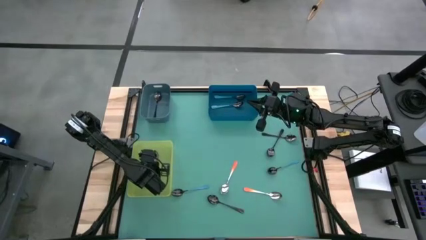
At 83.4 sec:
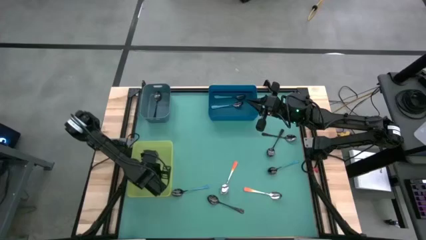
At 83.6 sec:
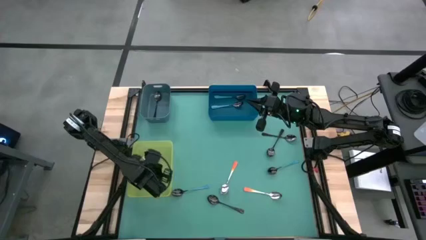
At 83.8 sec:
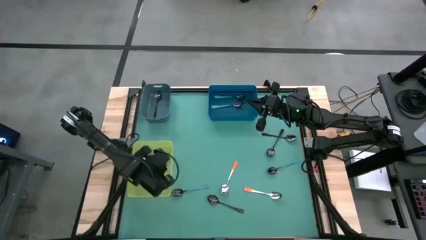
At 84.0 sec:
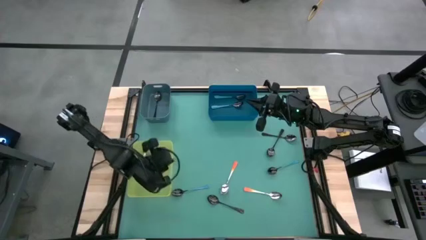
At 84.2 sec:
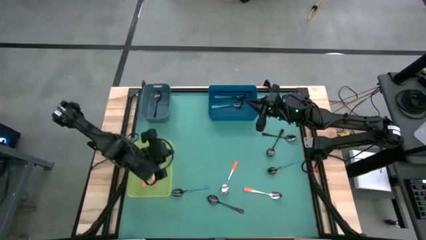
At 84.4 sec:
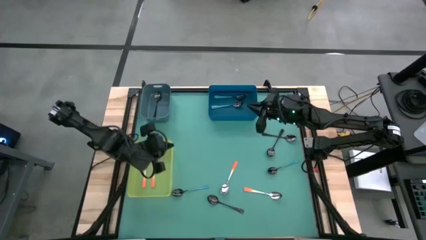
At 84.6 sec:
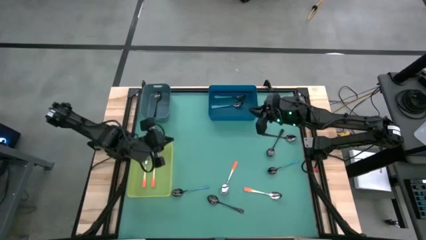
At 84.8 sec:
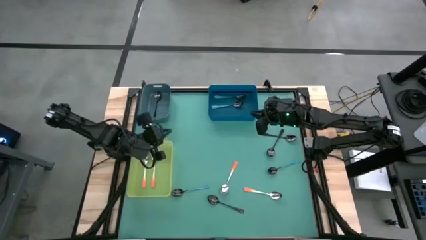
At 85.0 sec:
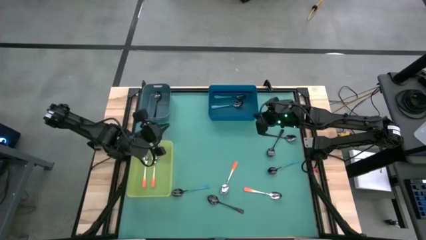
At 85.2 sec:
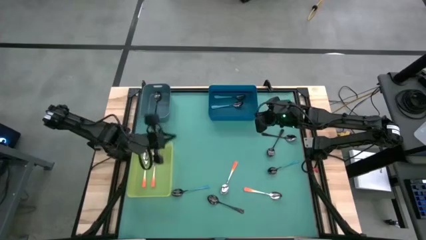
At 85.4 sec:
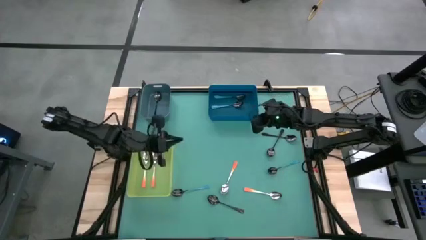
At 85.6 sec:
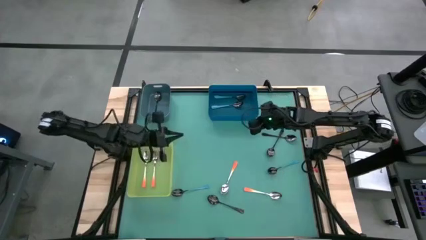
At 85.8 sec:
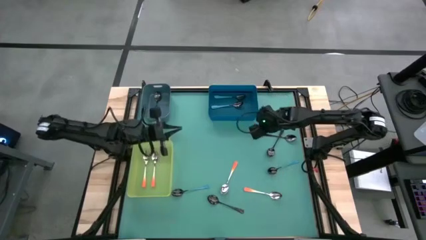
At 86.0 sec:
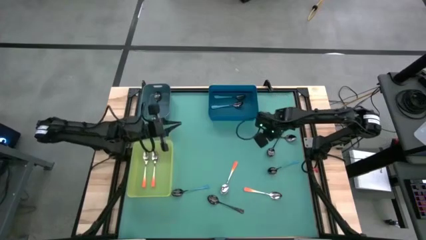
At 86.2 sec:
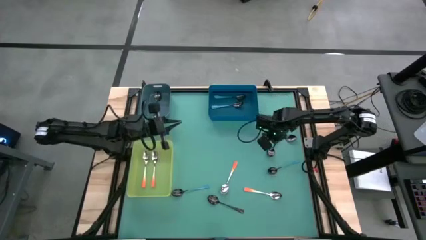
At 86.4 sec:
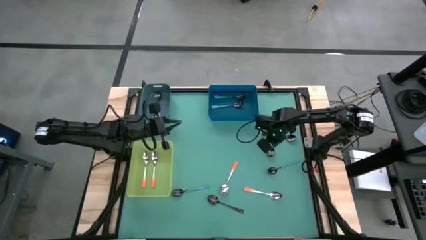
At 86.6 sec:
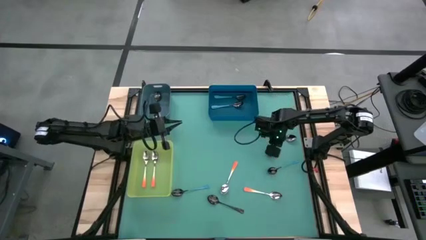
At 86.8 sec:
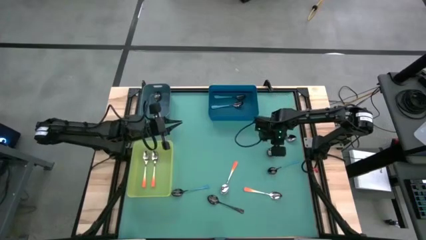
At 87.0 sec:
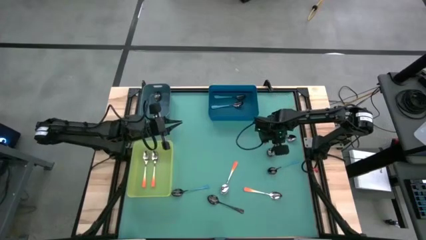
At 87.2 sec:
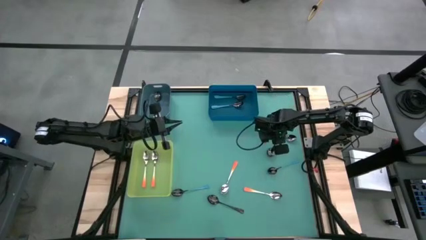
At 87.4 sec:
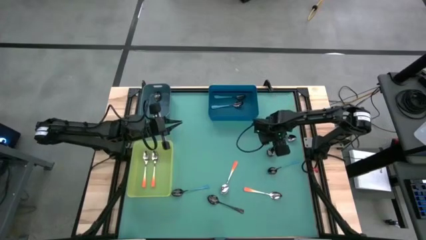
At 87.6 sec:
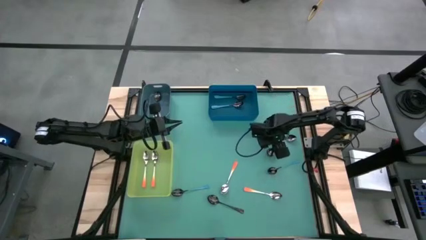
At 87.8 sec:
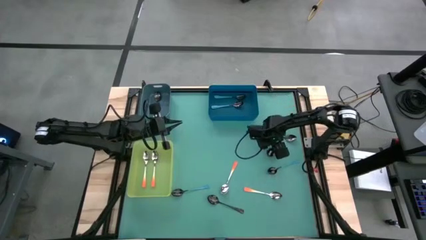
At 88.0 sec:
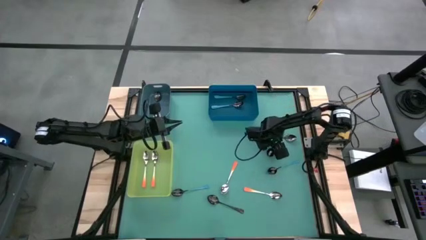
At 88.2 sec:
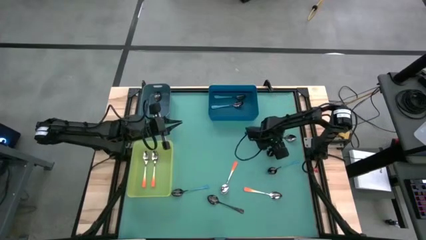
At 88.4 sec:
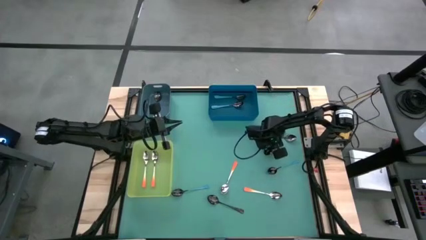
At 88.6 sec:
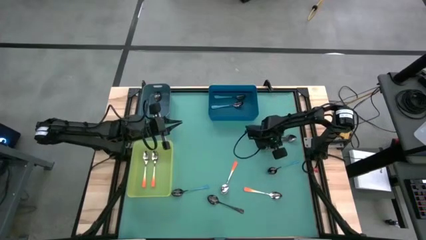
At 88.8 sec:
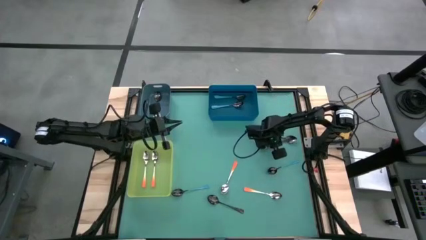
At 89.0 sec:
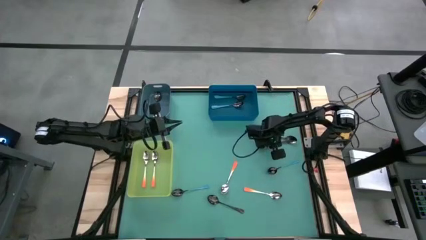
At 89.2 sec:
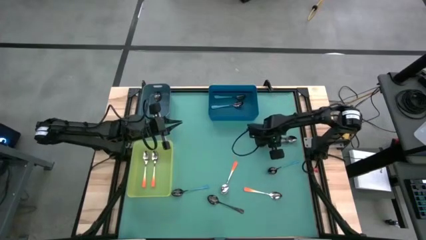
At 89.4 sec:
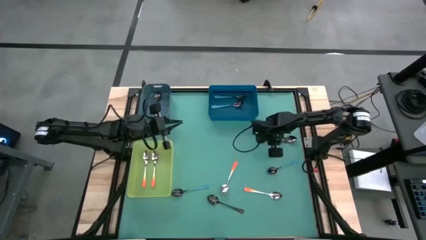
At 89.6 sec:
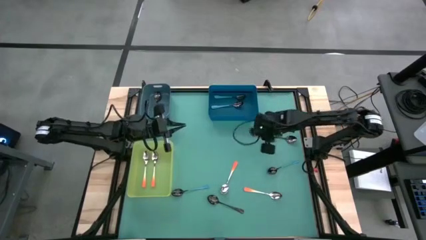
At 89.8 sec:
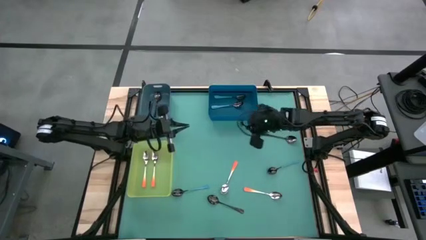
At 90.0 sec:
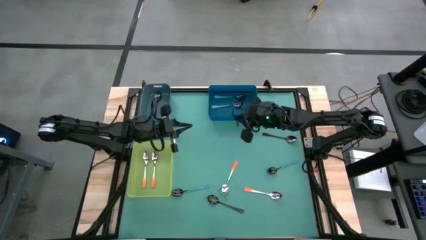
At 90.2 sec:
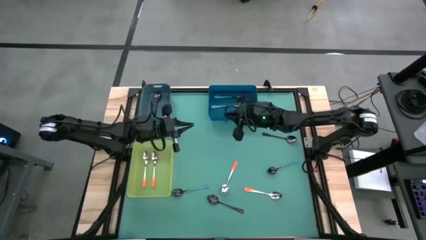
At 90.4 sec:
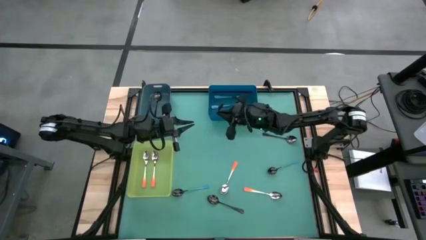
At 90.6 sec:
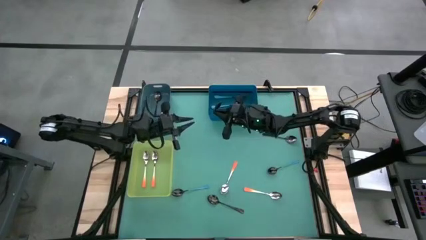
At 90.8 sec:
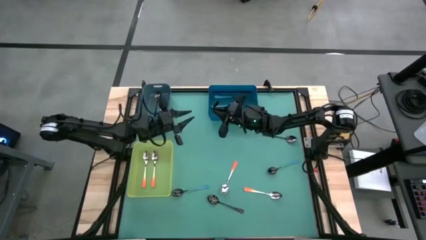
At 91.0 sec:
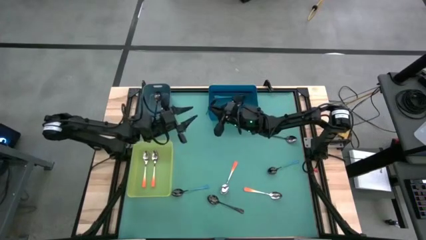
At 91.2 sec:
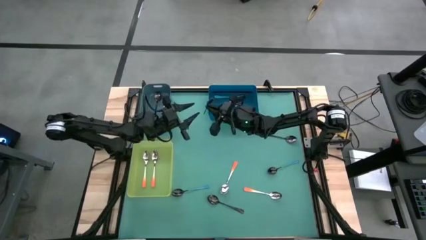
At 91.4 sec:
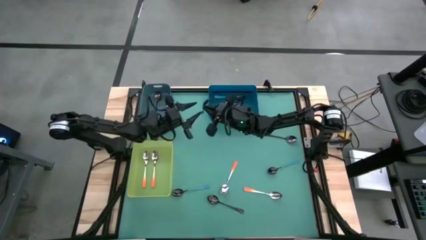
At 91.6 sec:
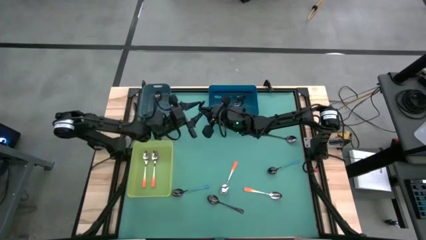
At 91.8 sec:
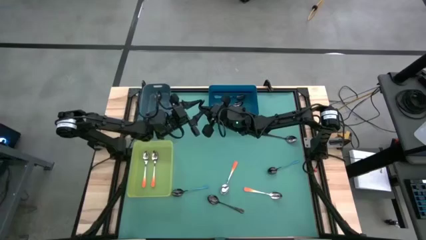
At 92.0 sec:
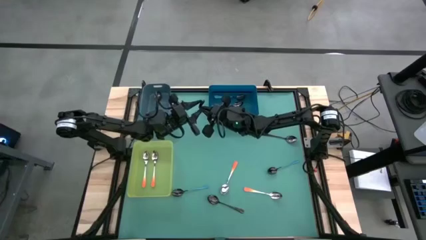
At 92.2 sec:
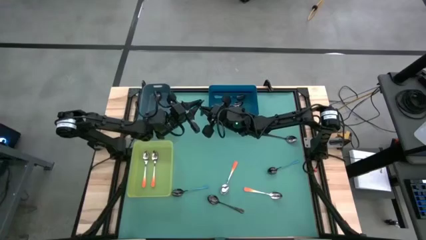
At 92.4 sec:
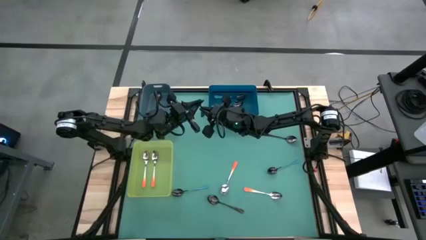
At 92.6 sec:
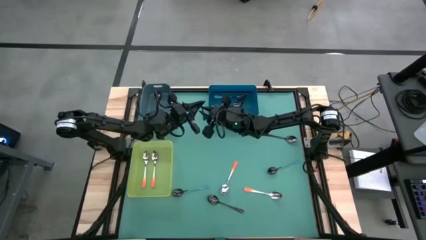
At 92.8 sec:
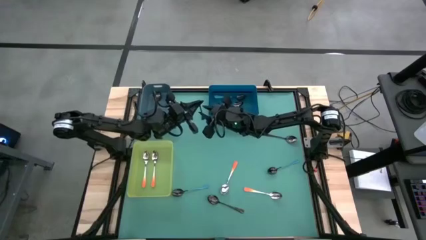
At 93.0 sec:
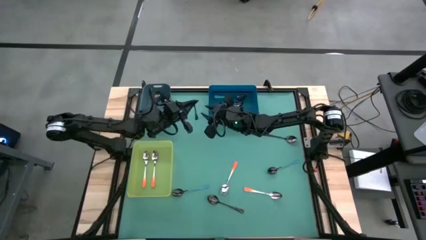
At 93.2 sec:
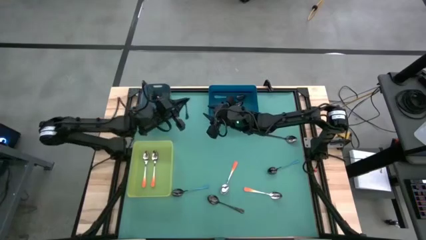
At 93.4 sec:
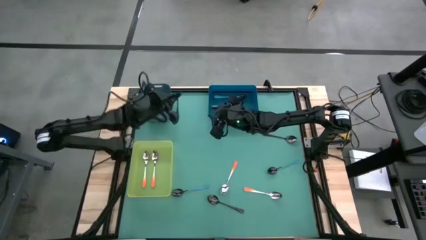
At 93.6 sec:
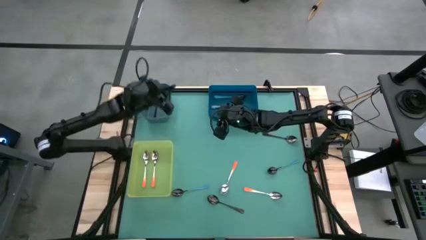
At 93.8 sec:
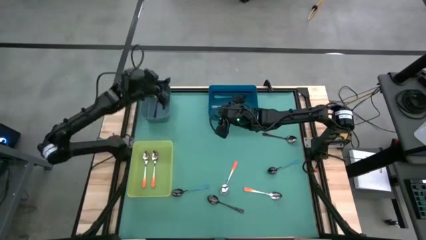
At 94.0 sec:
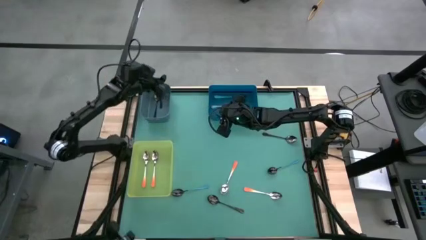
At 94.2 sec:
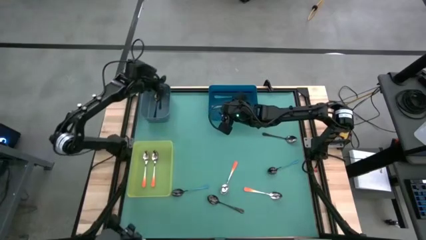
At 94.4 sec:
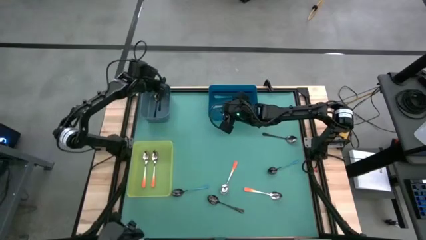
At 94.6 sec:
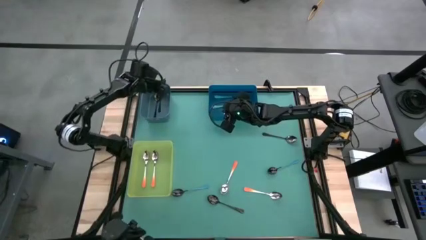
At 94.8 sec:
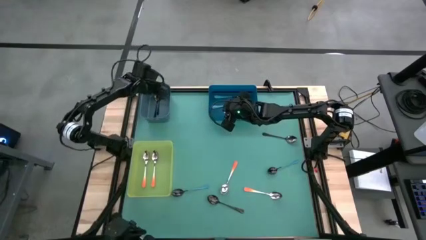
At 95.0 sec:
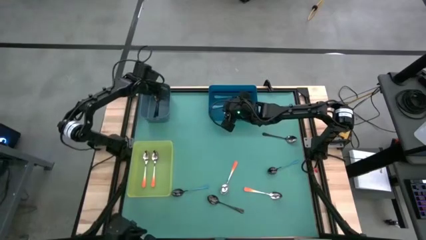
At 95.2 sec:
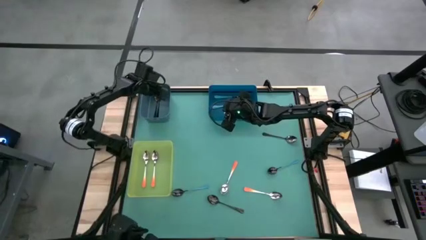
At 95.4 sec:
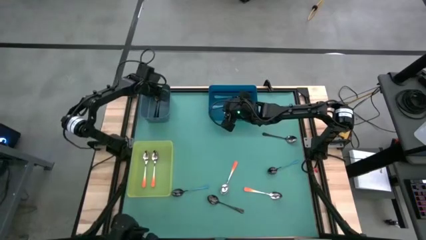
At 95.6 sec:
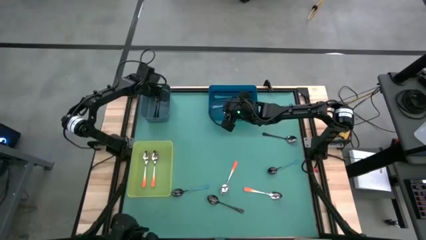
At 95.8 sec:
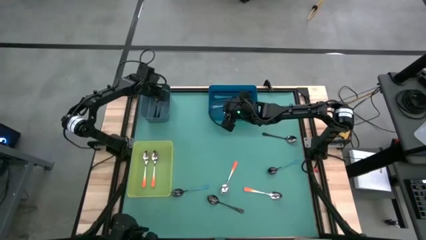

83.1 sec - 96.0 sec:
Task: Sort silverware by color (type)
Put the black spoon into the blue bin
